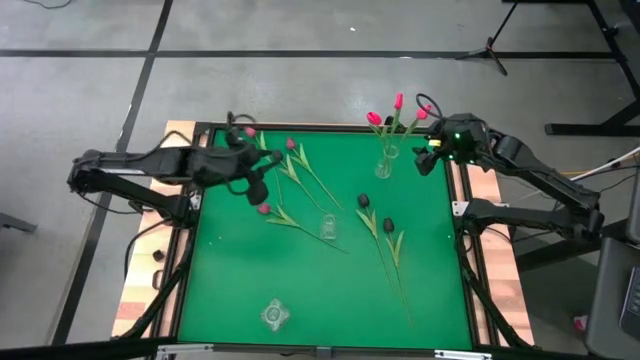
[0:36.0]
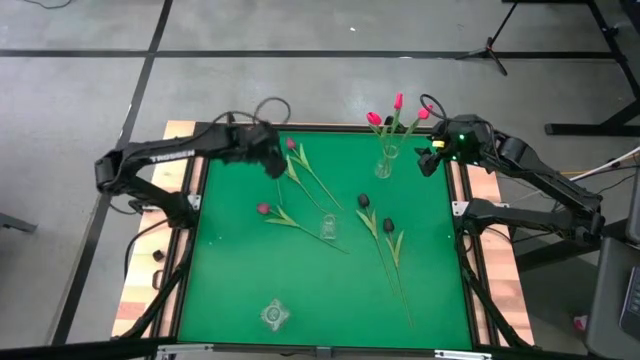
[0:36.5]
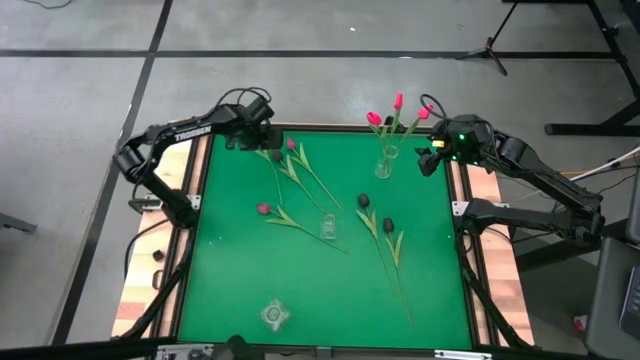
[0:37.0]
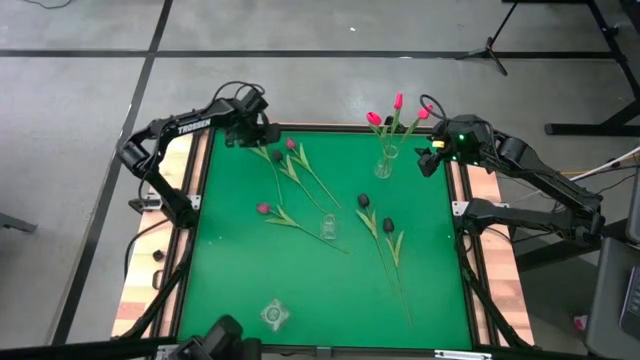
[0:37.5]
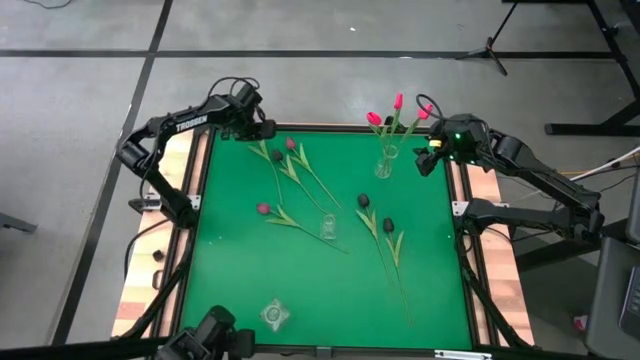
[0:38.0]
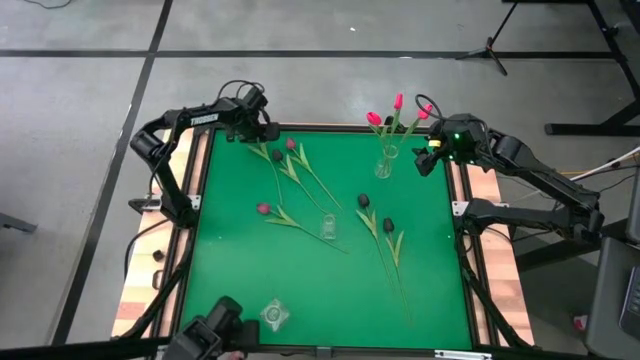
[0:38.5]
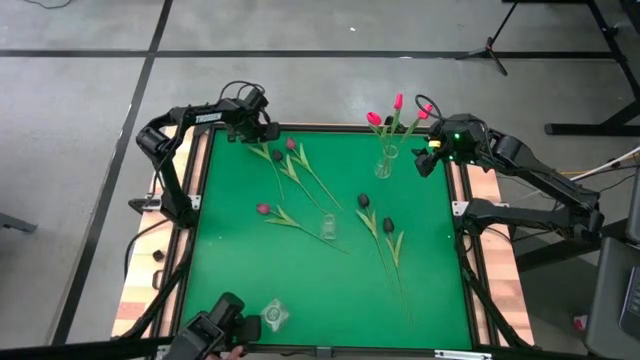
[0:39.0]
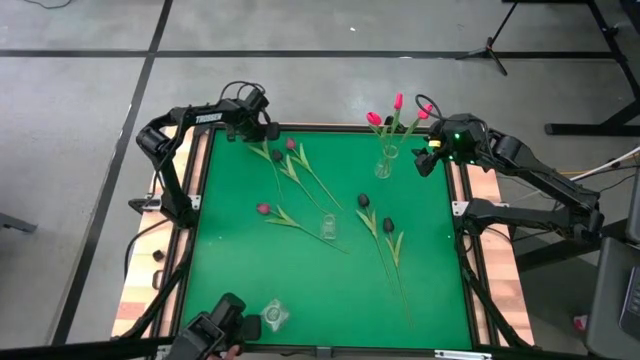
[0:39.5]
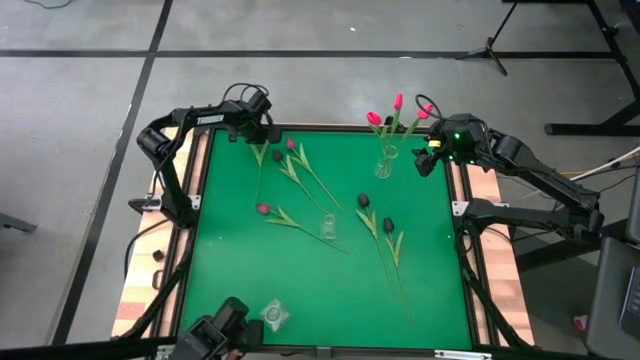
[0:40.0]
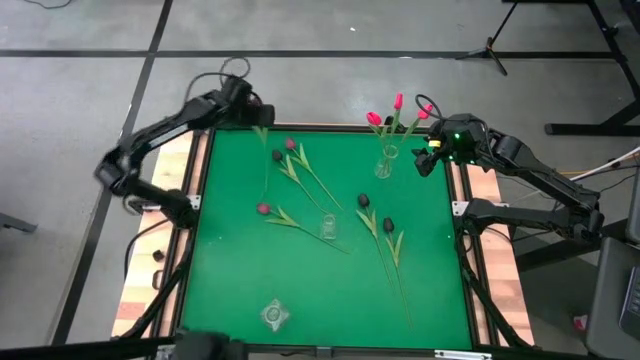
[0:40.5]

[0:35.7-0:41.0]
Task: Sort flowers into vase by color
Put the top left dark red tulip into the center transparent vase

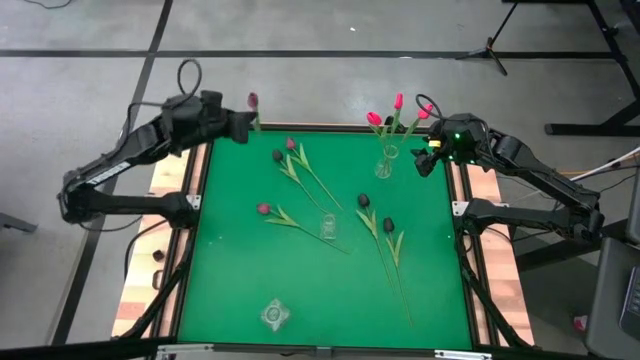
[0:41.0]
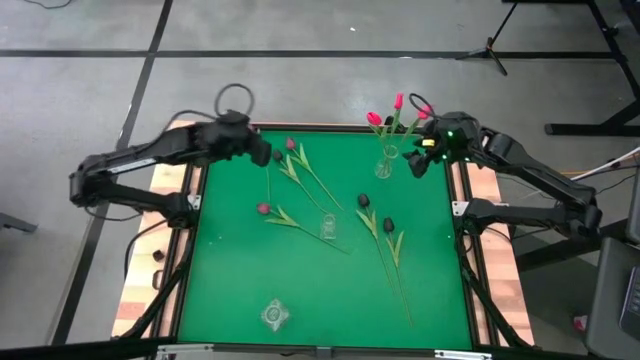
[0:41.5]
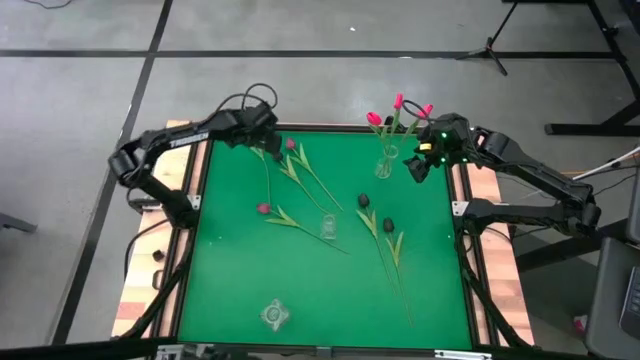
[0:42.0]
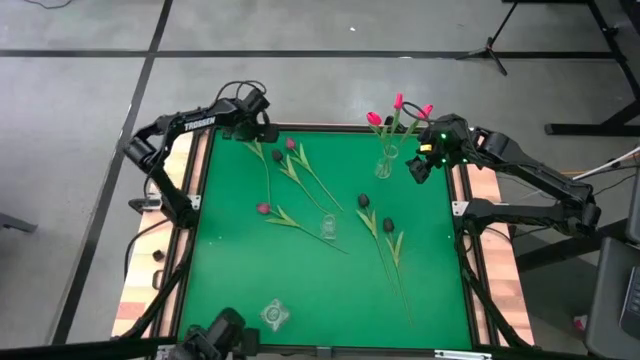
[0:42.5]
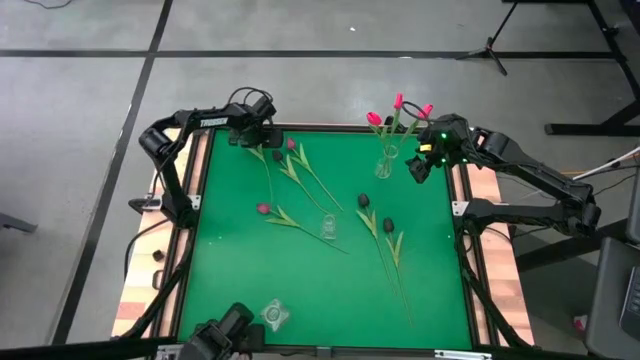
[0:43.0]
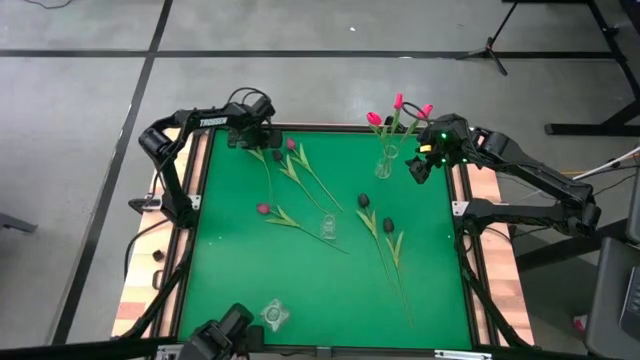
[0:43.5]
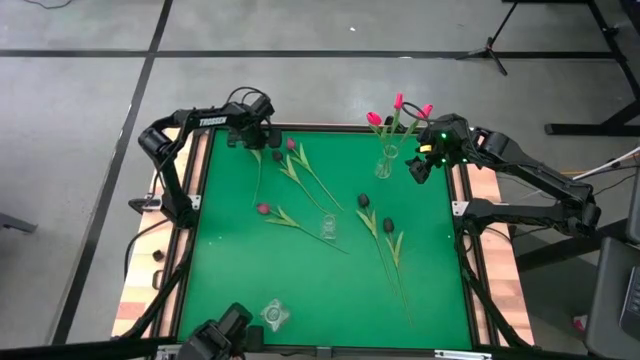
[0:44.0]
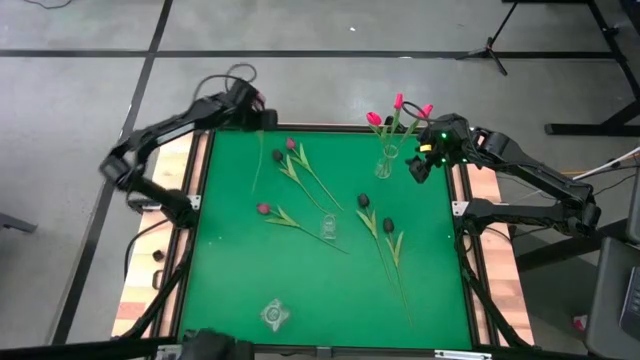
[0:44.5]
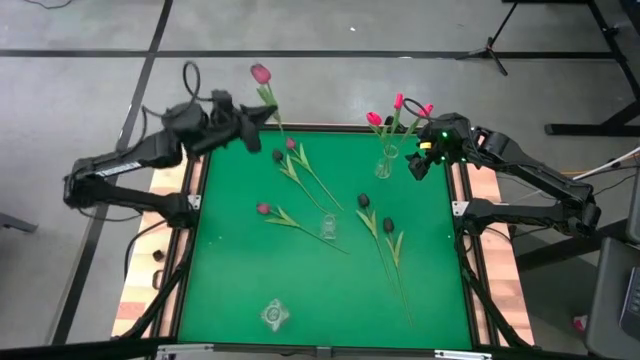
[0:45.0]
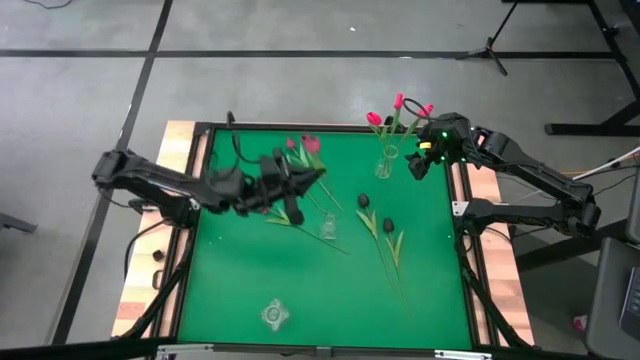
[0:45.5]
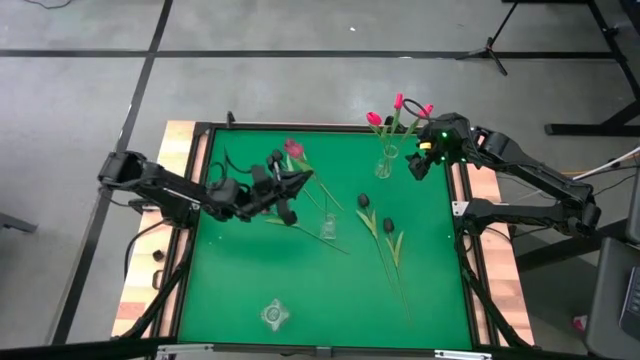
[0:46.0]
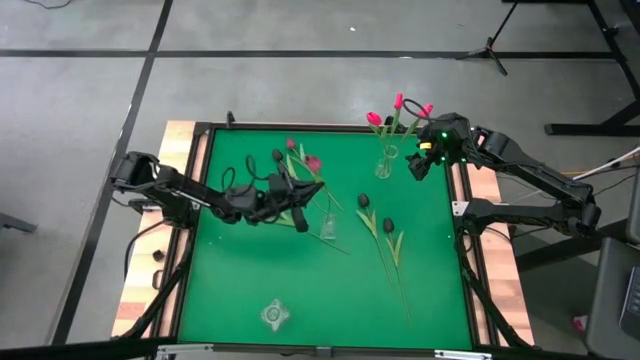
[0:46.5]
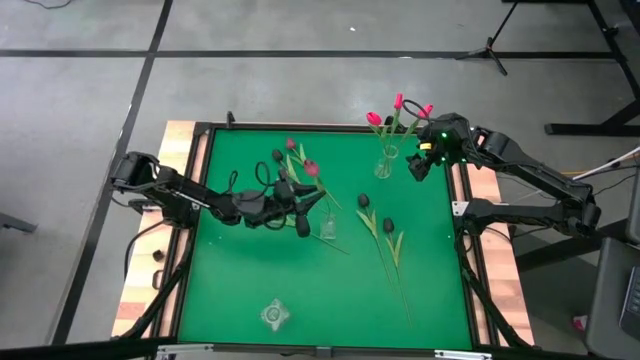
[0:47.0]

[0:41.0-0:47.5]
Put the top left dark red tulip into the center transparent vase

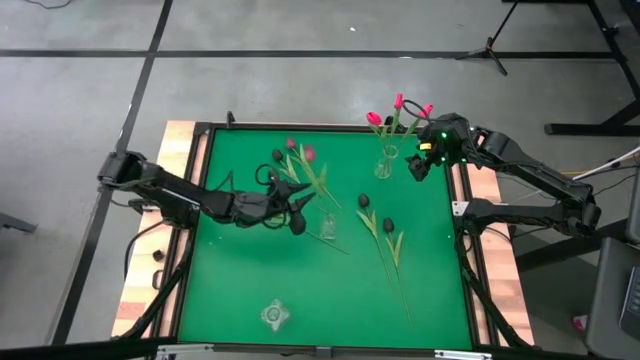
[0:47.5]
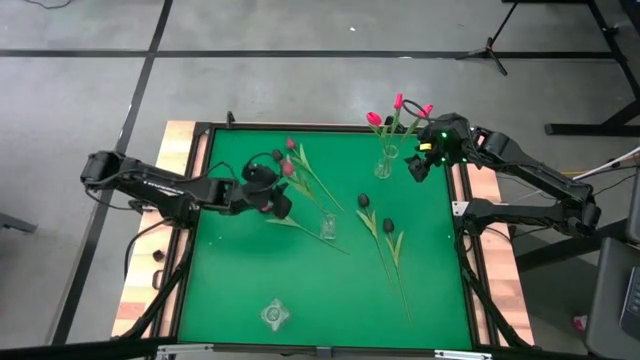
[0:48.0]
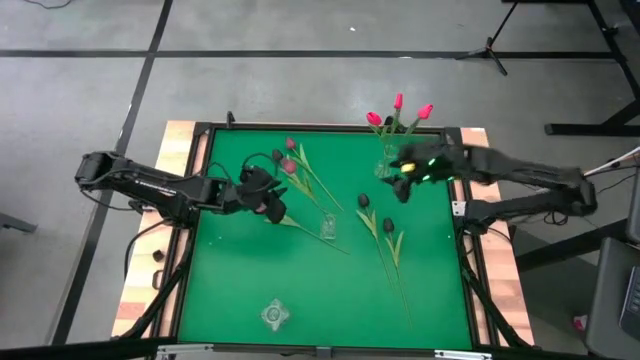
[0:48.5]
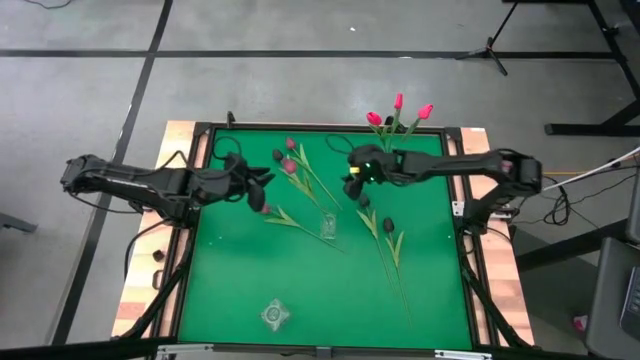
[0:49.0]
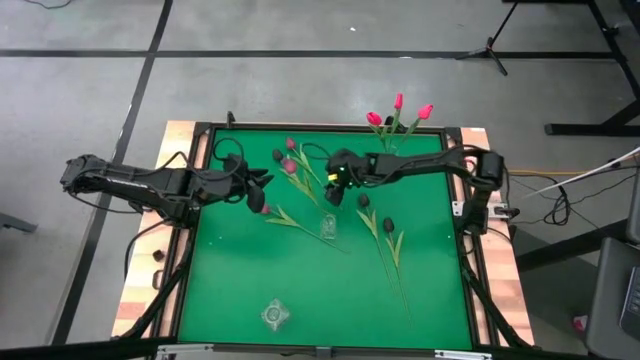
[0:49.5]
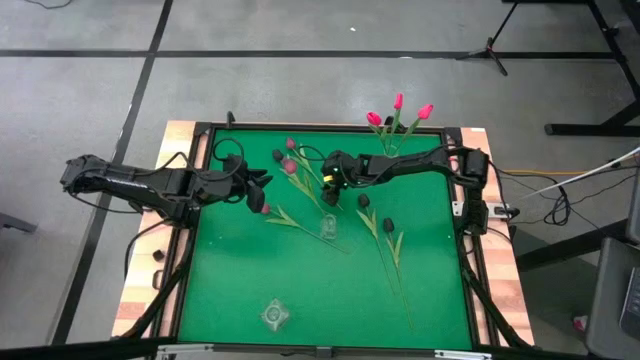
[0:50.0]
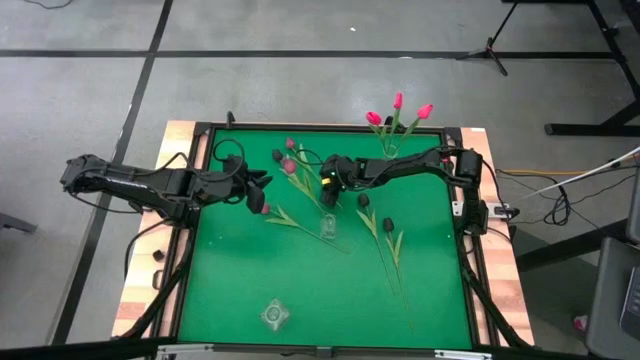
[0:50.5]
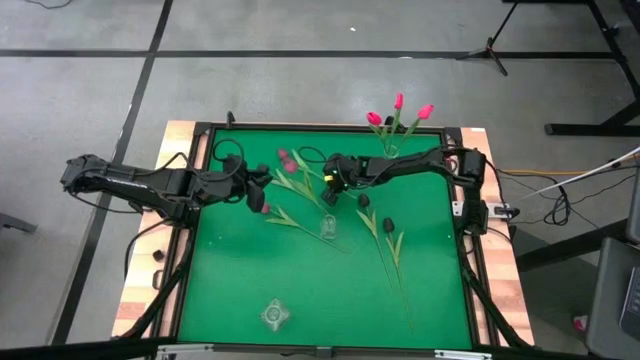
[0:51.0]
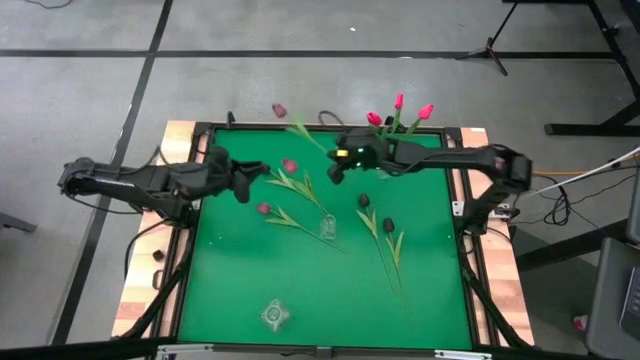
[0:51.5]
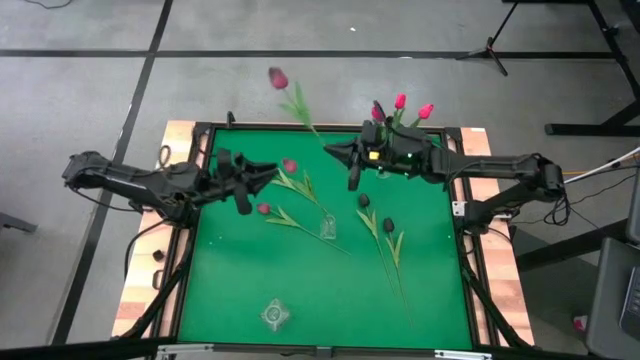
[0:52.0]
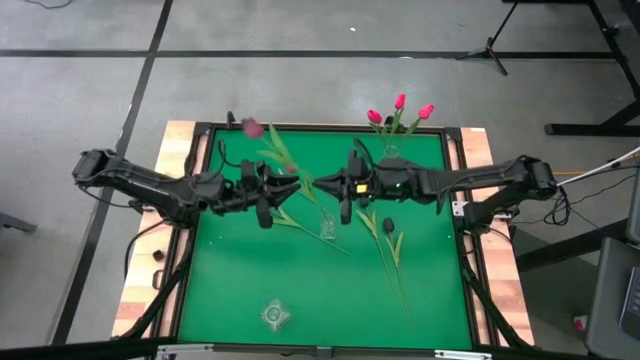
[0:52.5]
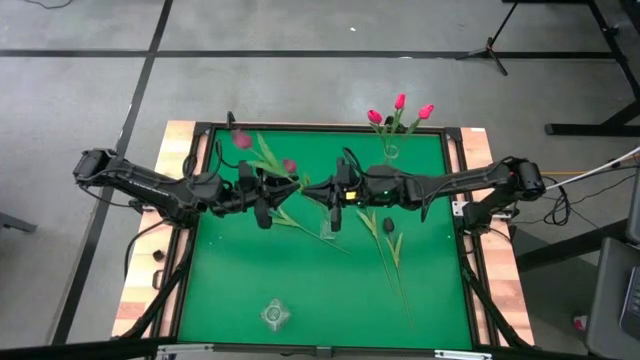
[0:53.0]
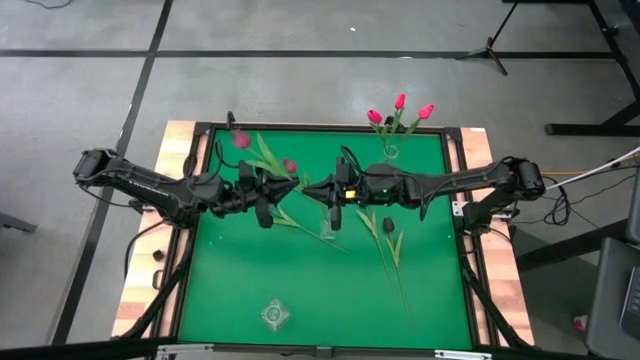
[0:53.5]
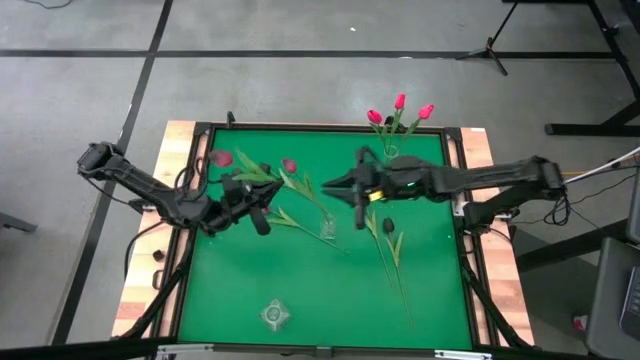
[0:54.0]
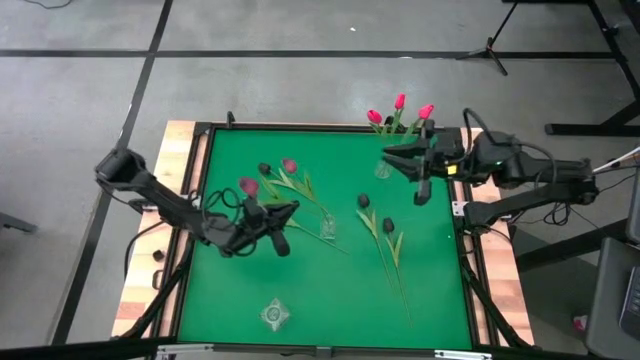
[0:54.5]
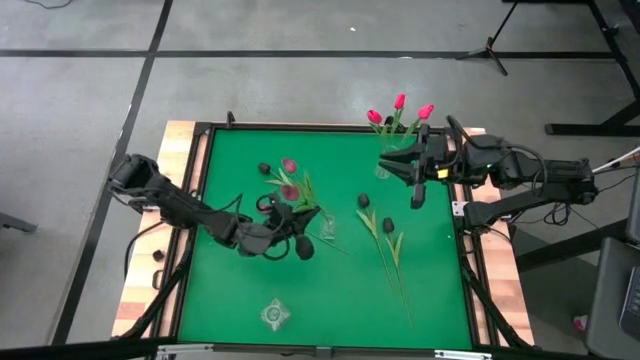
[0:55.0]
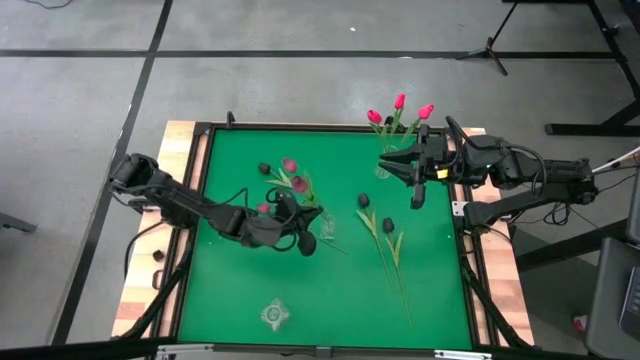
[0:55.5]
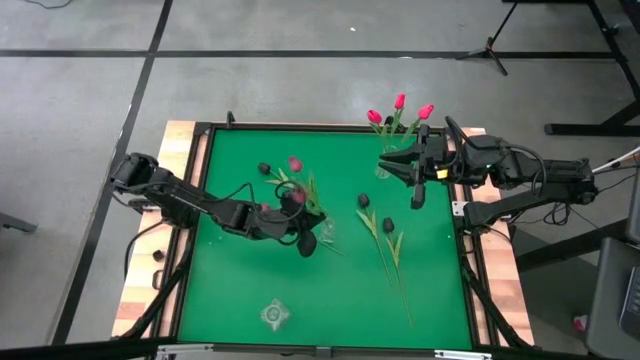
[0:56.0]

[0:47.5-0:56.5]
Put the top dark red tulip into the center transparent vase
